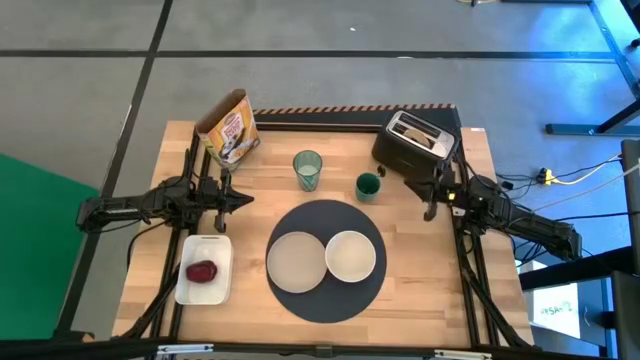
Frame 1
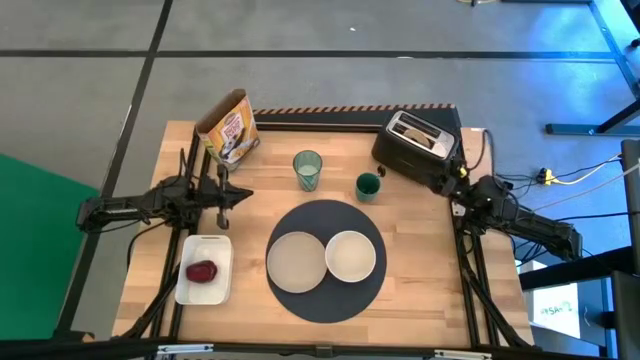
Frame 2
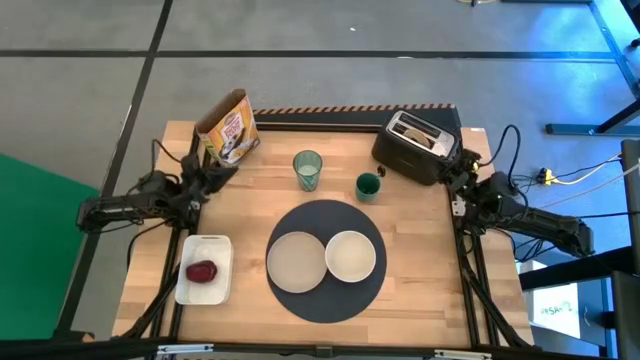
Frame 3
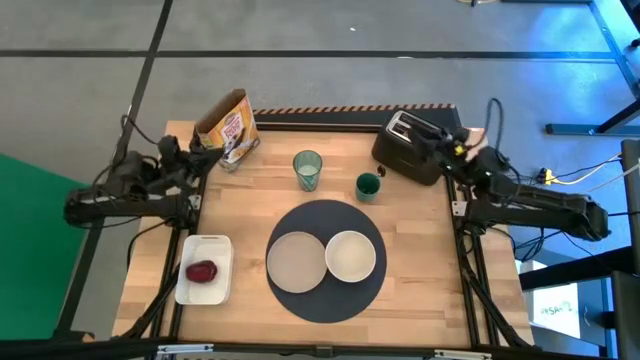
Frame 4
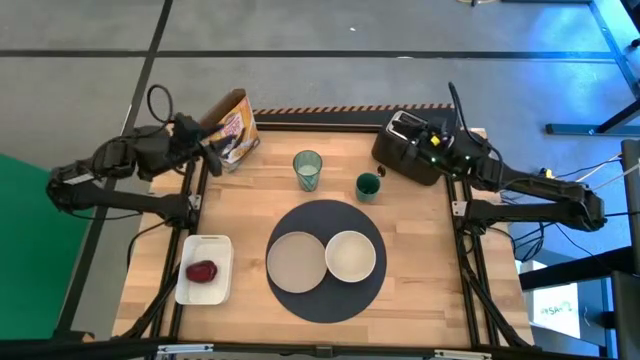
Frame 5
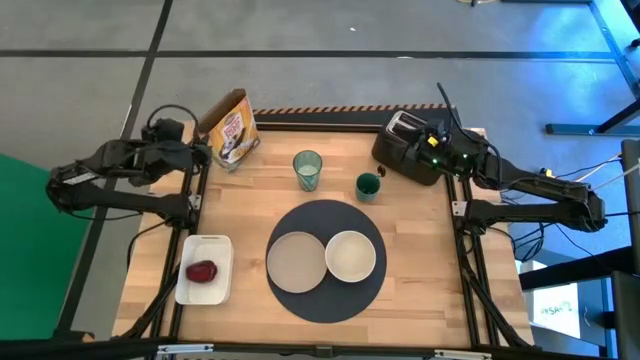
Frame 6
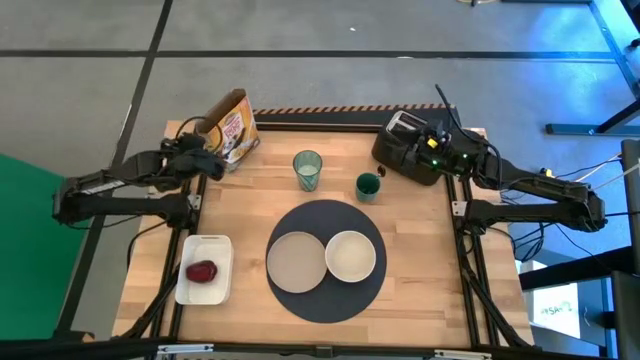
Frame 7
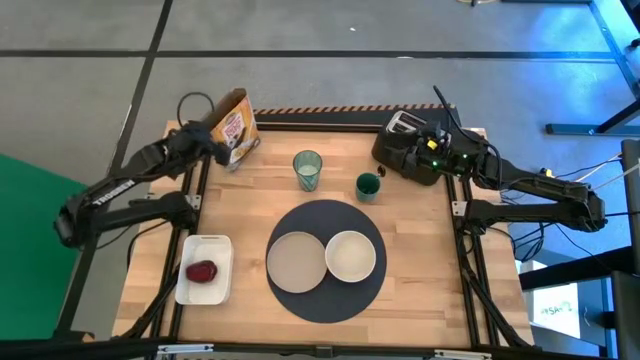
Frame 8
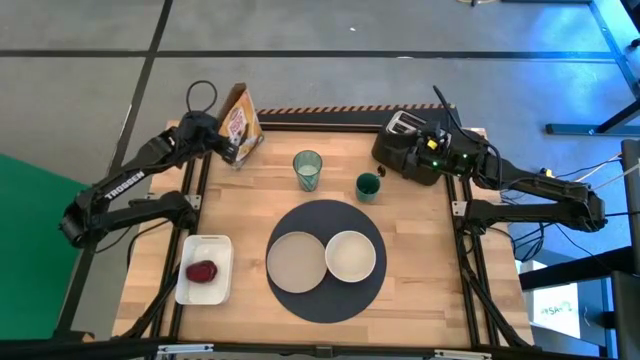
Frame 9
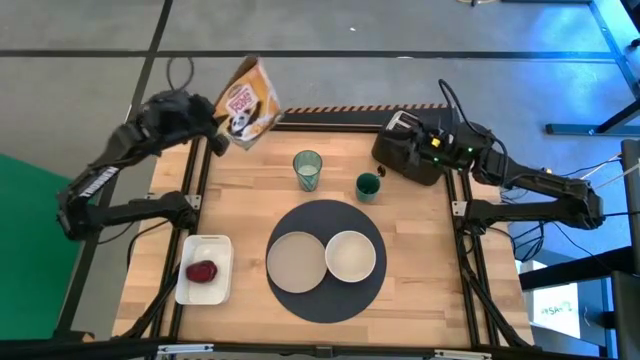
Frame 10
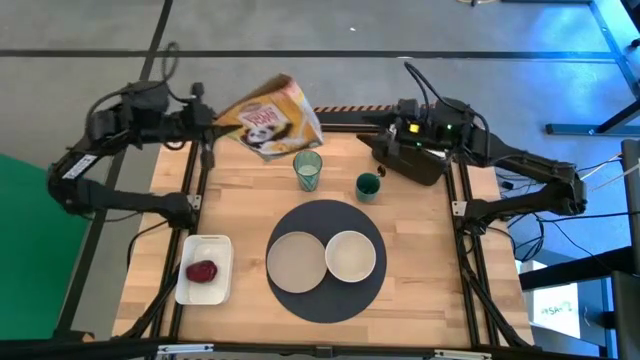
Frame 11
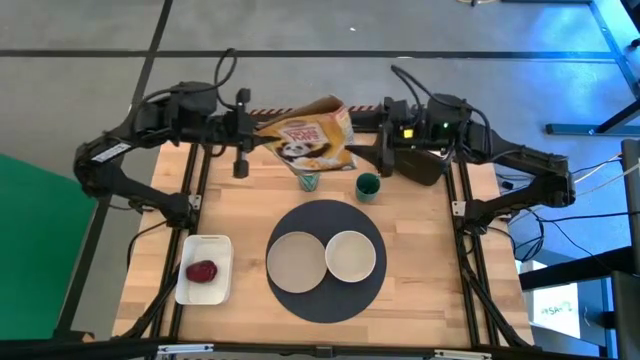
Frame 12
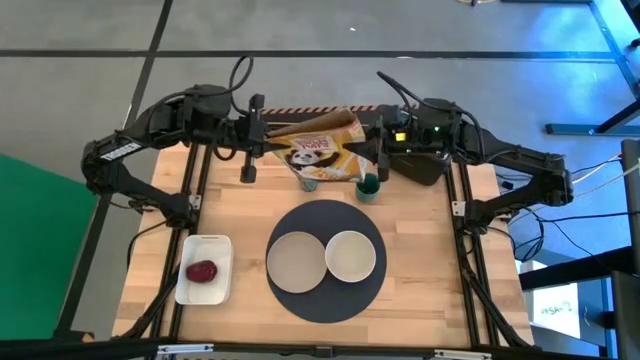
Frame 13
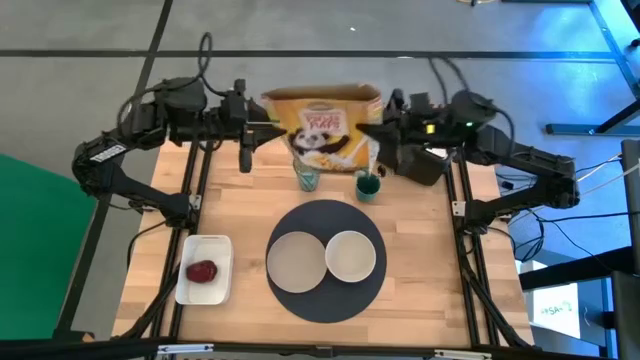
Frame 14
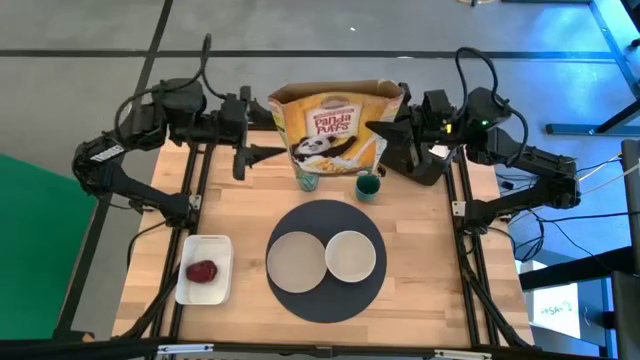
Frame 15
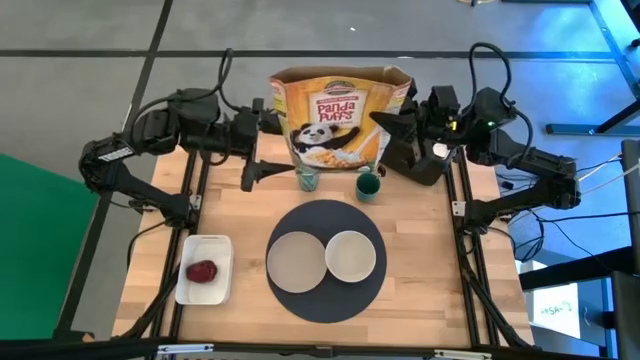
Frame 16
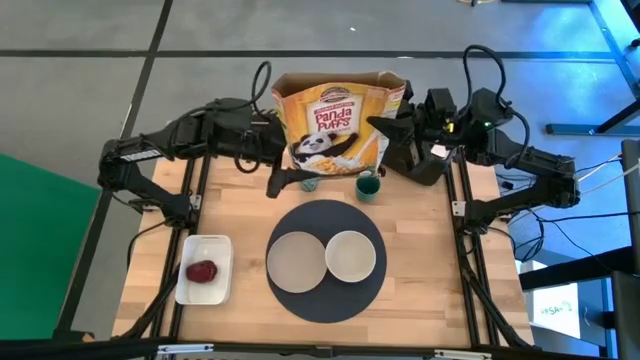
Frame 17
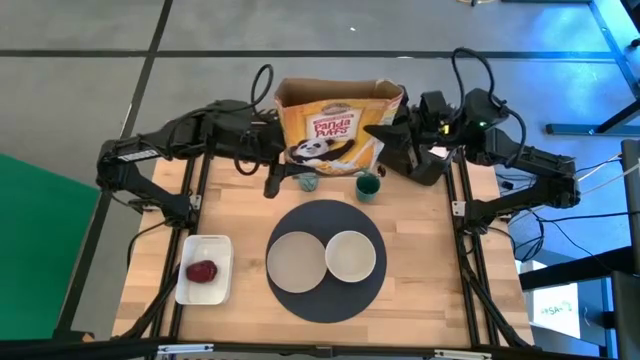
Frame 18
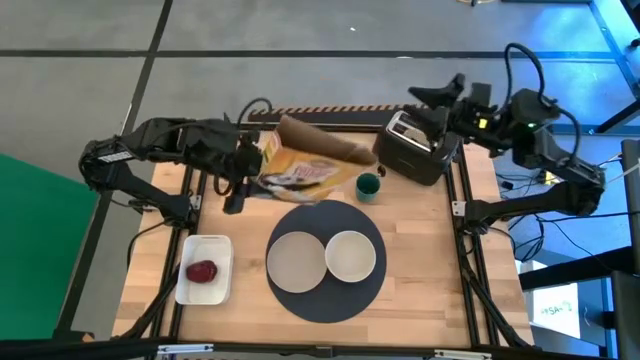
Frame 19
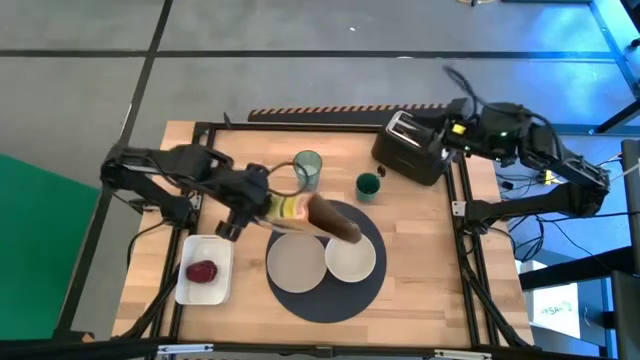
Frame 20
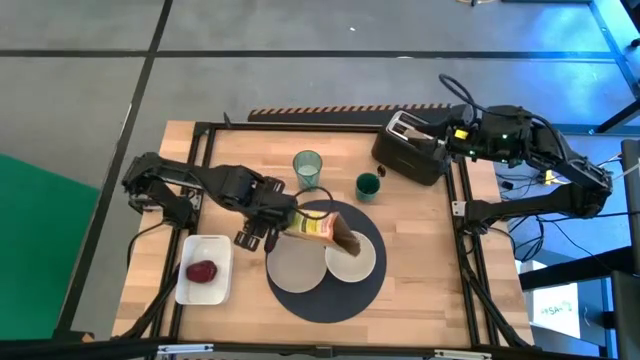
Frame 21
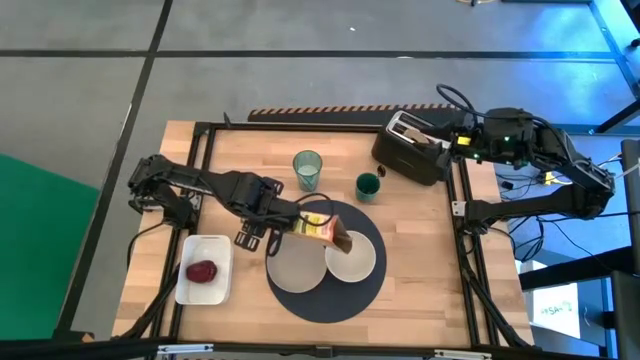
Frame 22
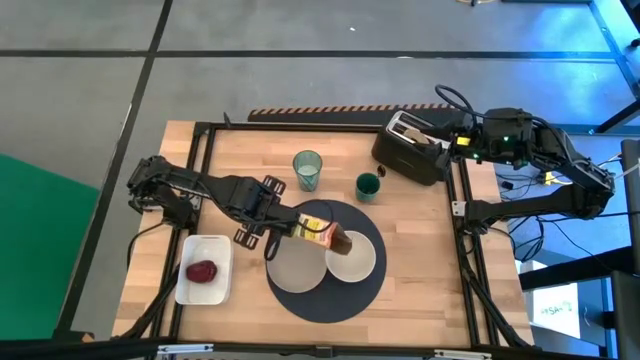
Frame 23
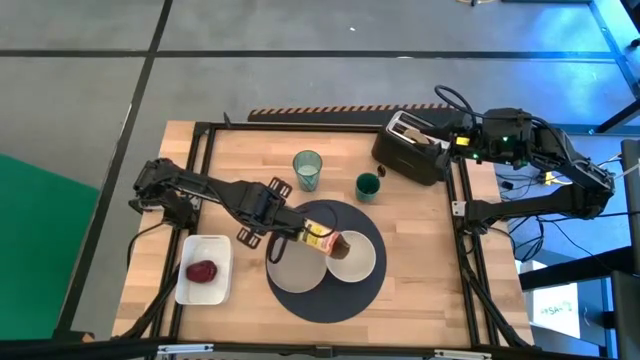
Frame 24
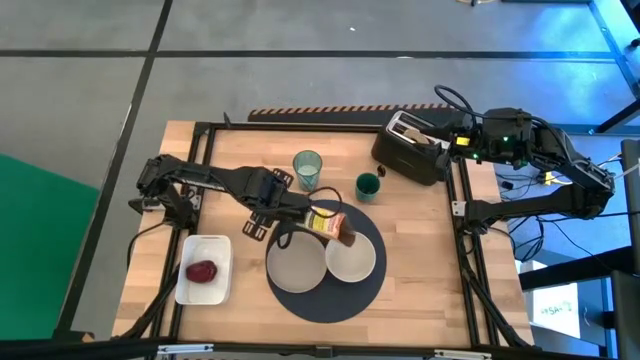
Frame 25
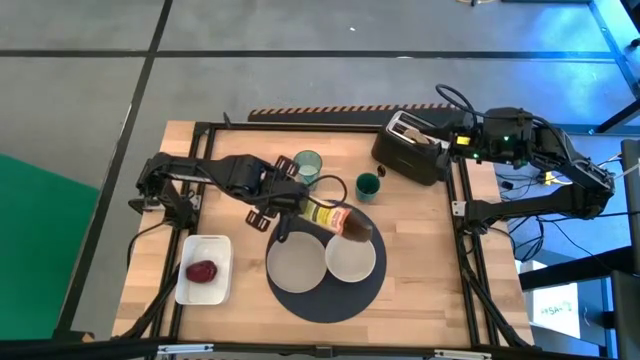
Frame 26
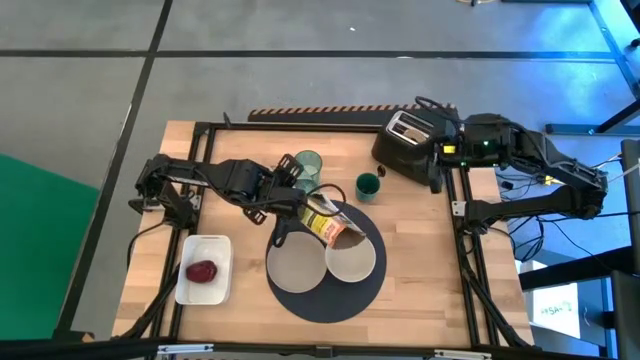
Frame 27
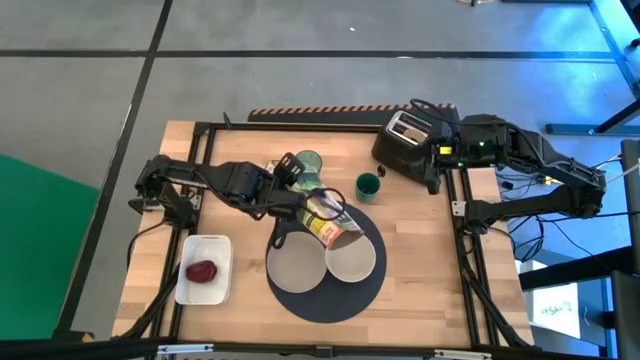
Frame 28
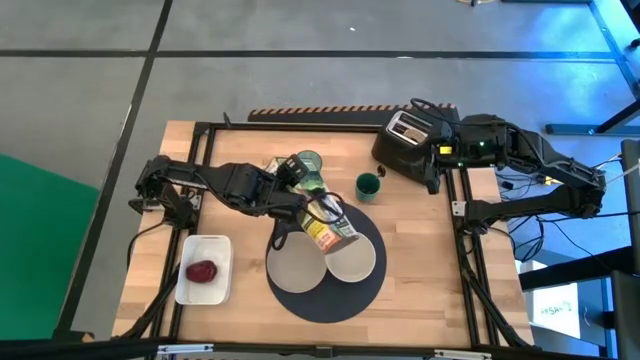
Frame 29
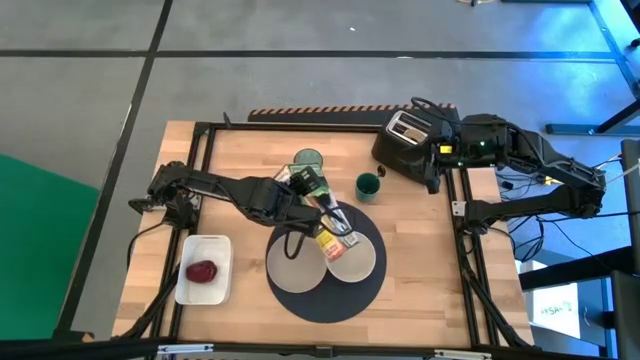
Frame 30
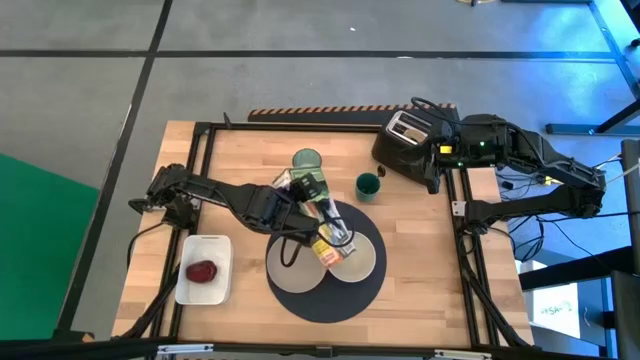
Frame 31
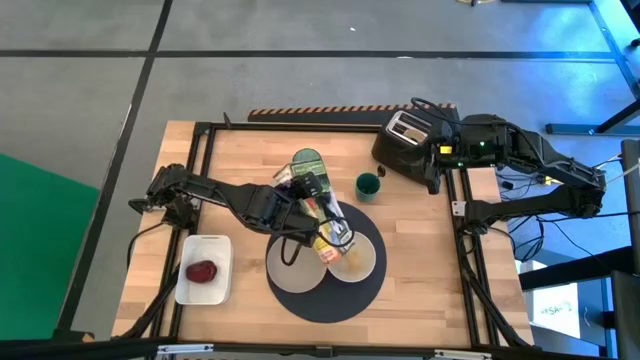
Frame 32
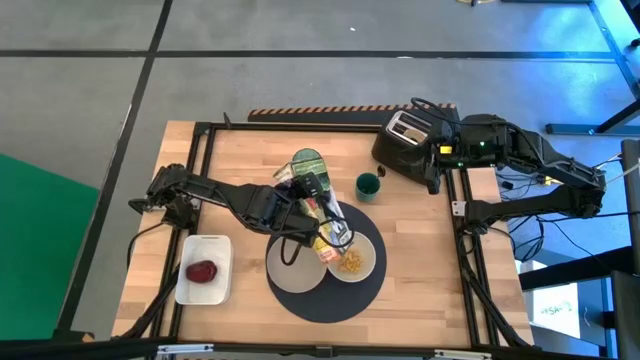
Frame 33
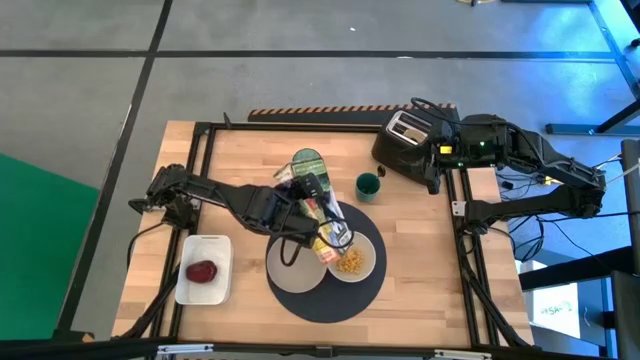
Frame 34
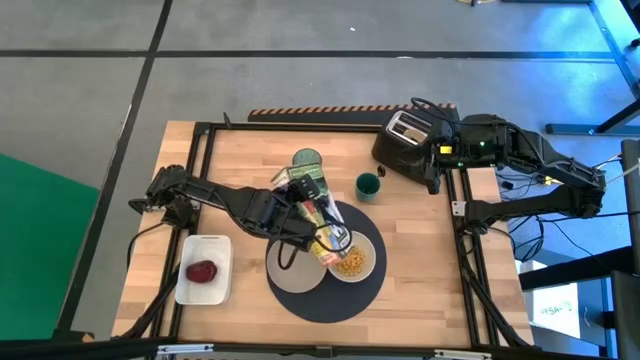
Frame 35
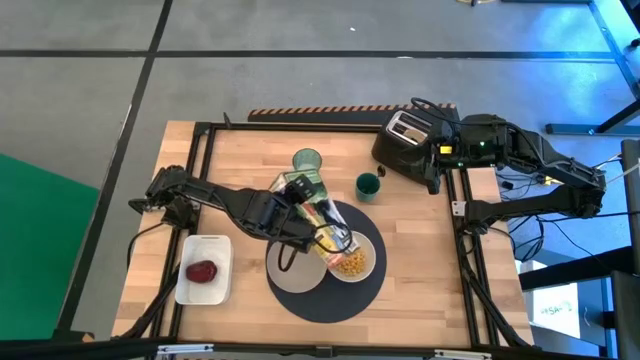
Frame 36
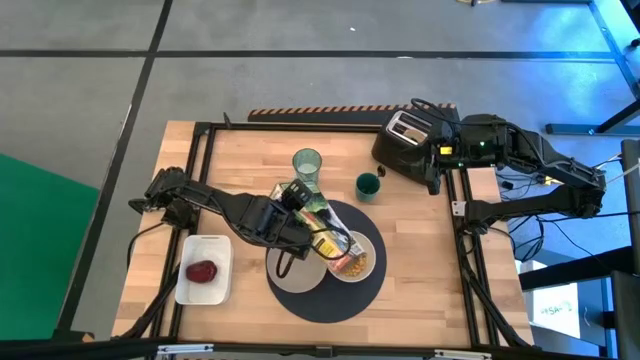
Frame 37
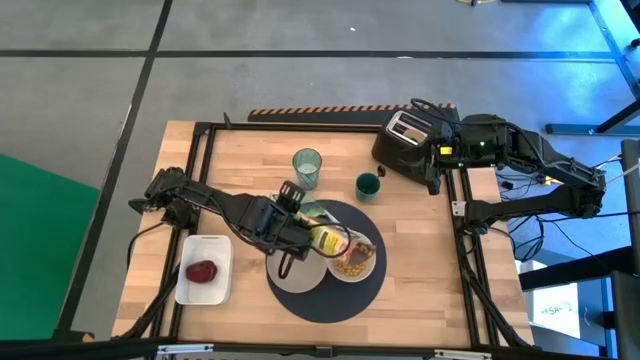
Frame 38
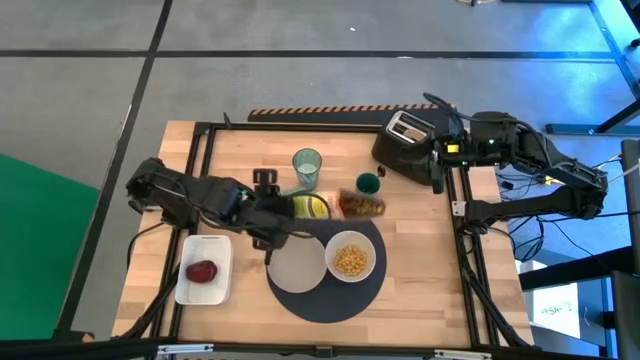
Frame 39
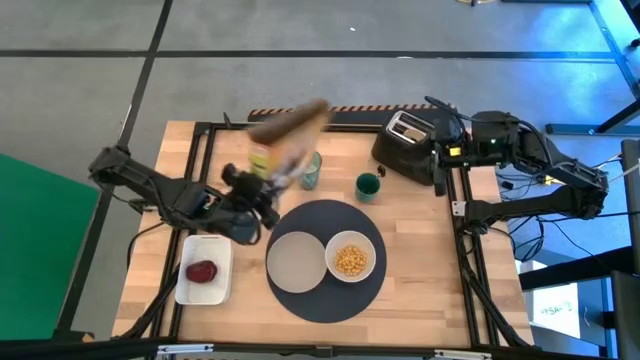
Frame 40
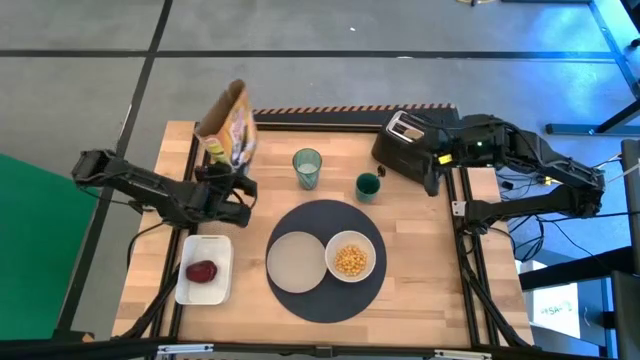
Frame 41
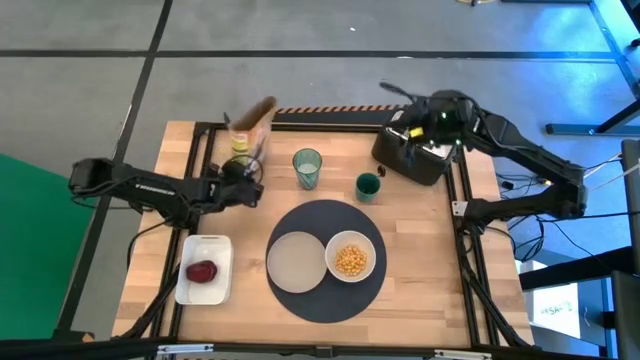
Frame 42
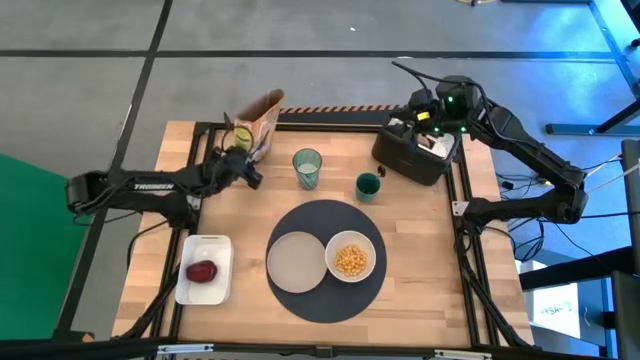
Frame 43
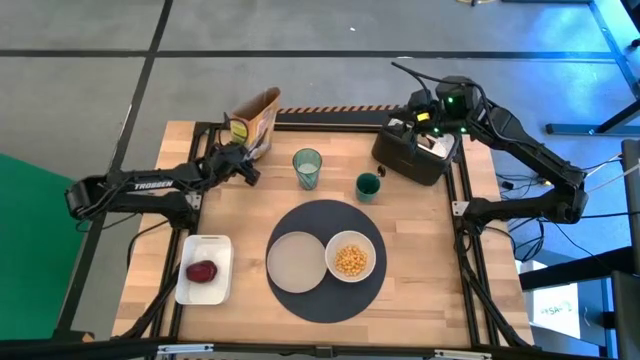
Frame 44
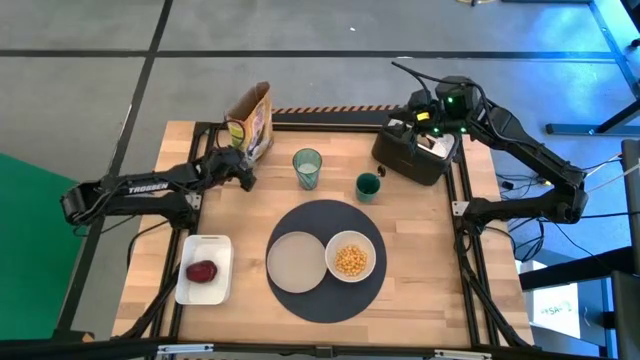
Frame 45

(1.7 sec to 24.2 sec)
Task: Arrange a breakfast setting
Pour the cereal from the cereal box into the white bowl
